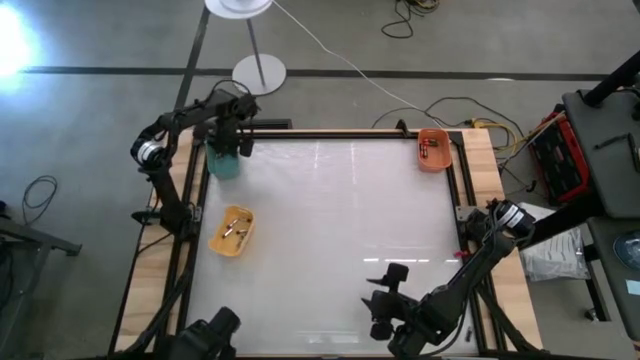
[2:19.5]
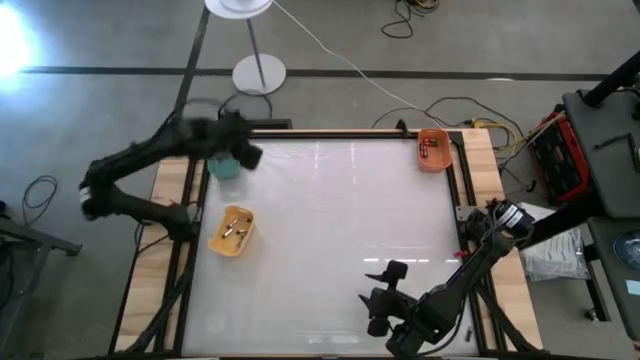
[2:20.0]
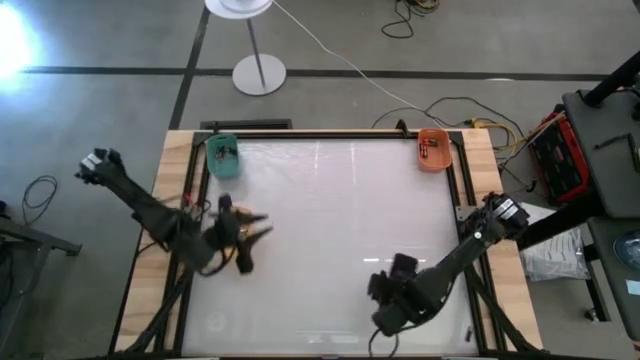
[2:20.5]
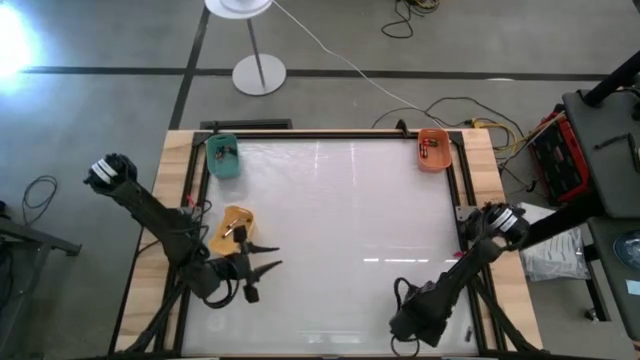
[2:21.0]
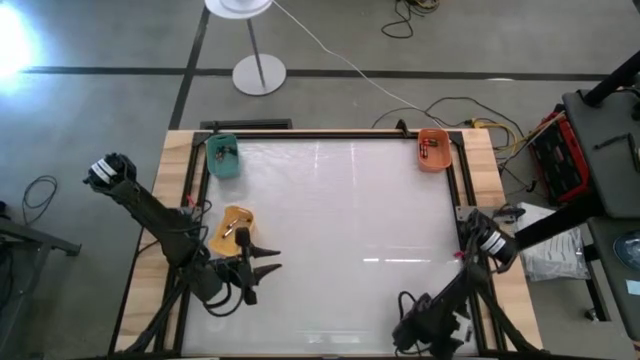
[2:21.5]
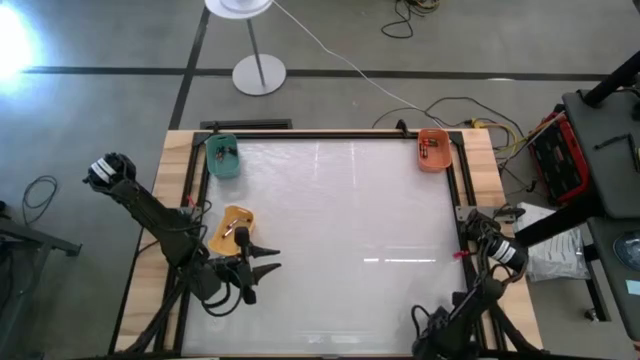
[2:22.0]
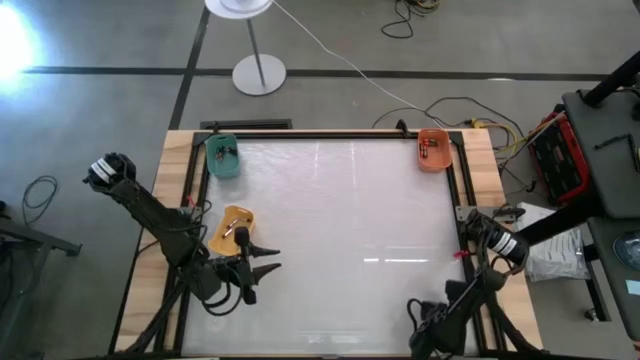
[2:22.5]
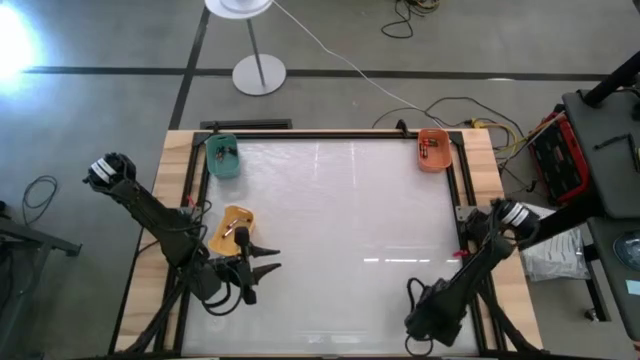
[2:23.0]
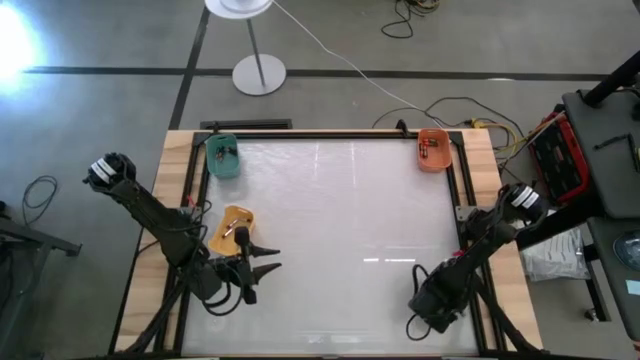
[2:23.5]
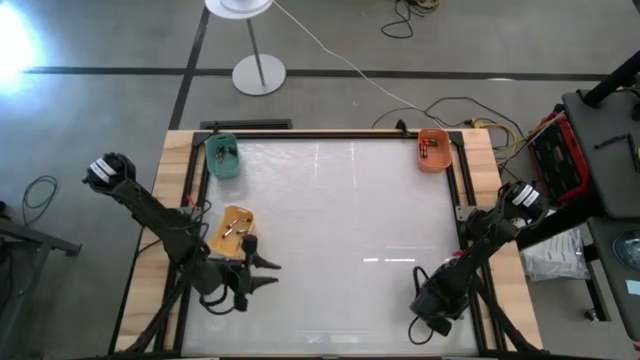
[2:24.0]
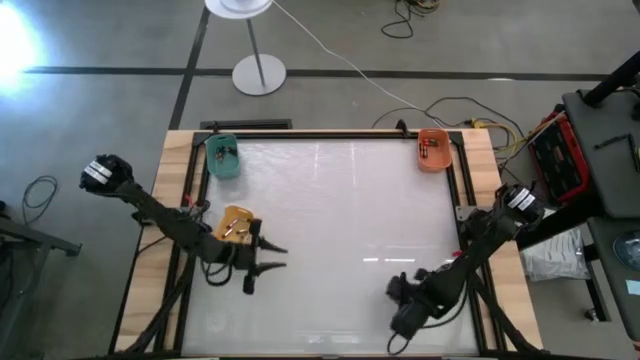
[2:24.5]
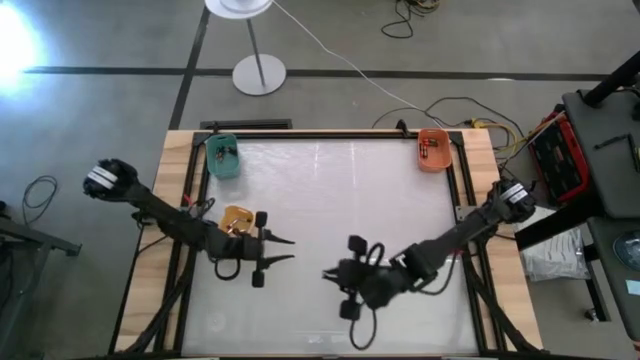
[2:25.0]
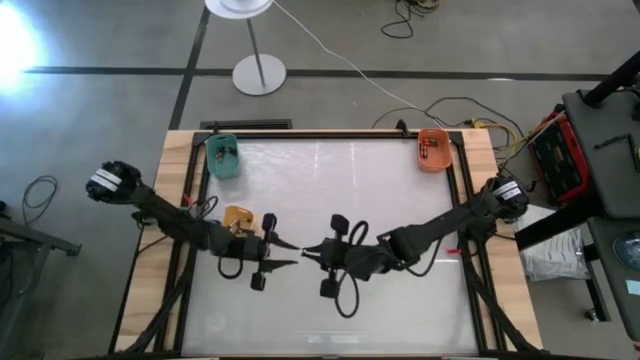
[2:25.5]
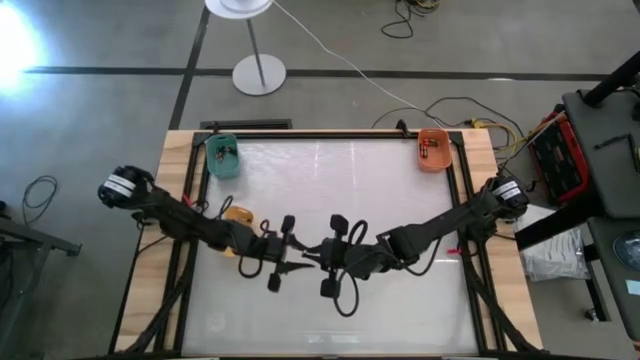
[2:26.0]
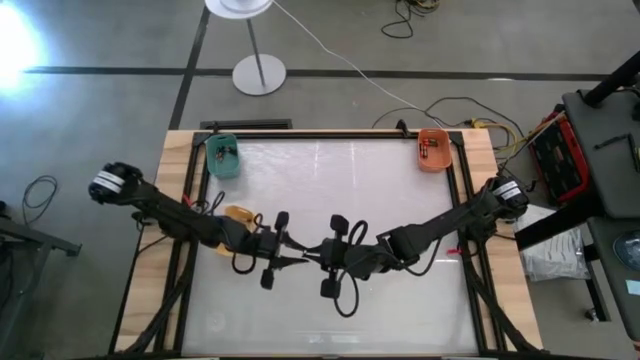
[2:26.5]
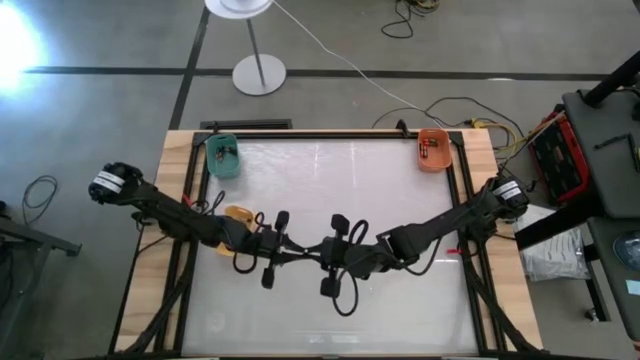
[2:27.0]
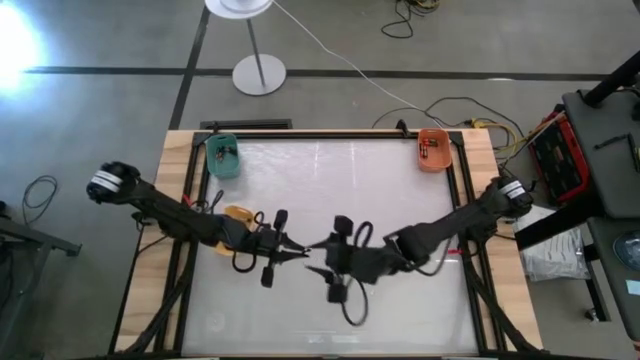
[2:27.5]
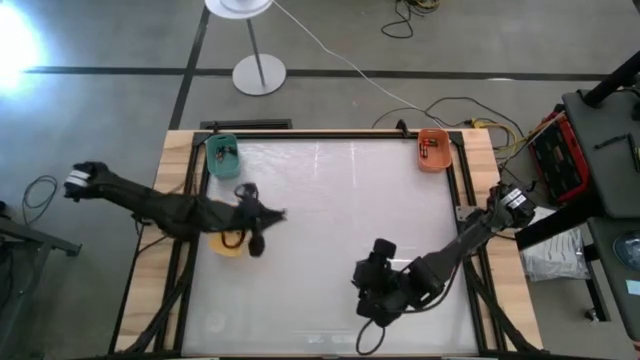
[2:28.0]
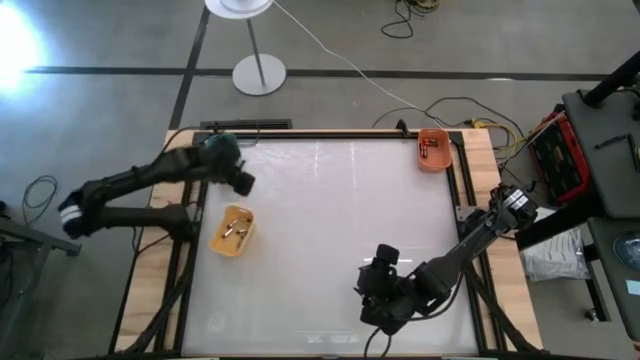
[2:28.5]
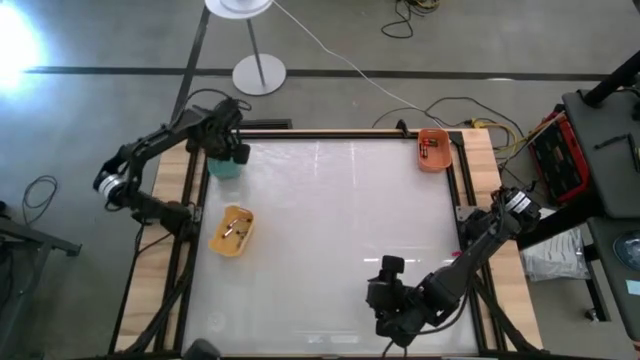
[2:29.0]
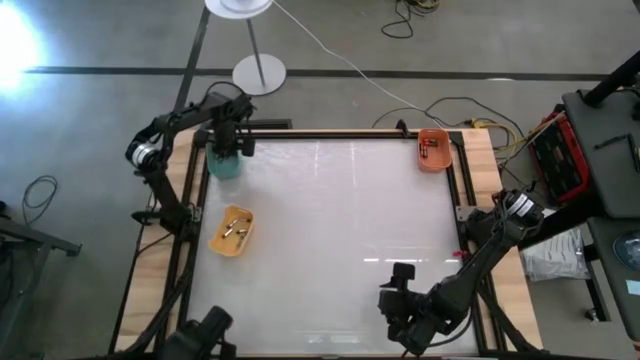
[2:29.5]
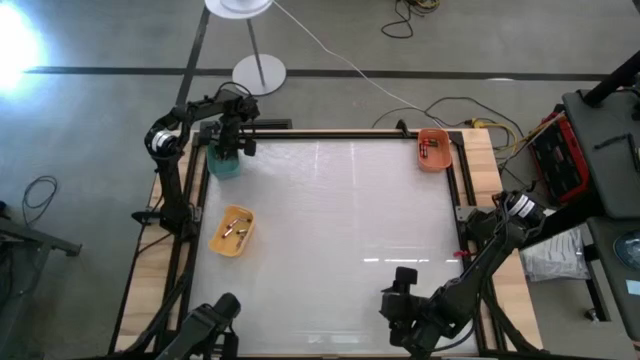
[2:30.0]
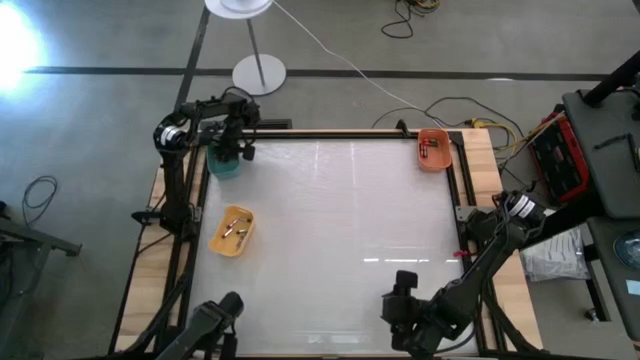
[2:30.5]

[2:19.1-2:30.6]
Task: Sort batteries
Put the black battery into the green bin

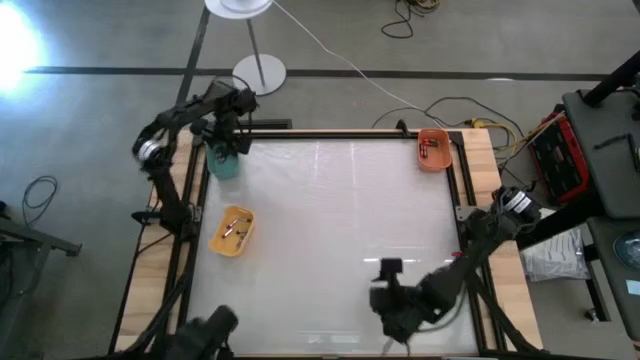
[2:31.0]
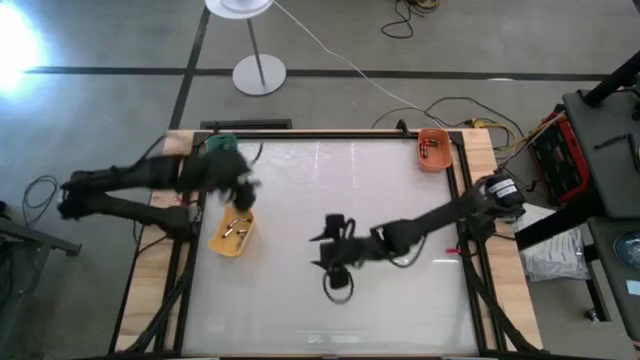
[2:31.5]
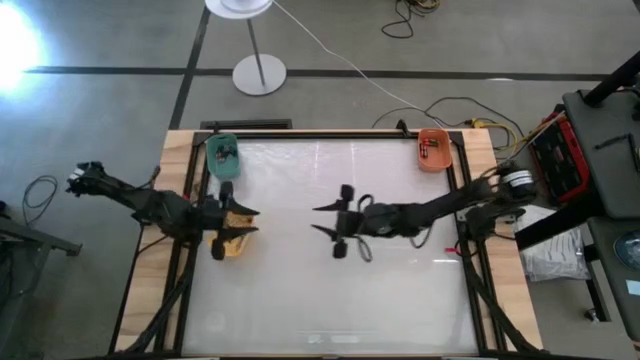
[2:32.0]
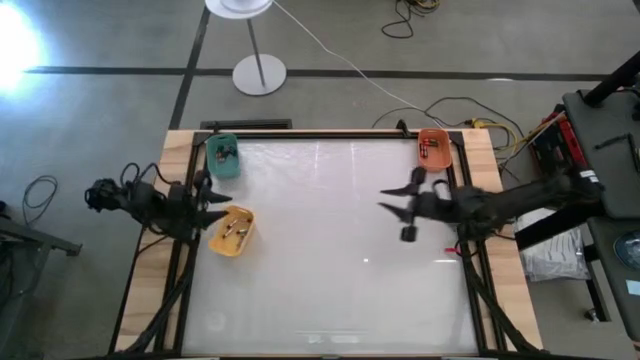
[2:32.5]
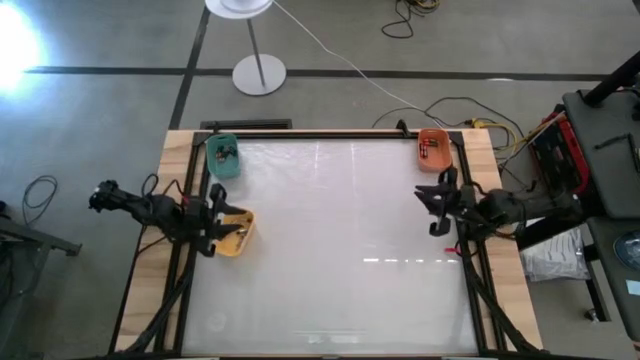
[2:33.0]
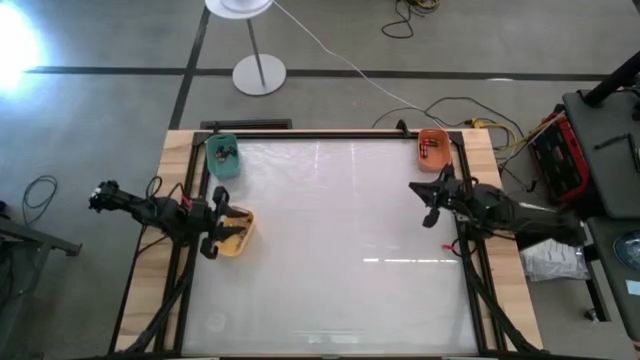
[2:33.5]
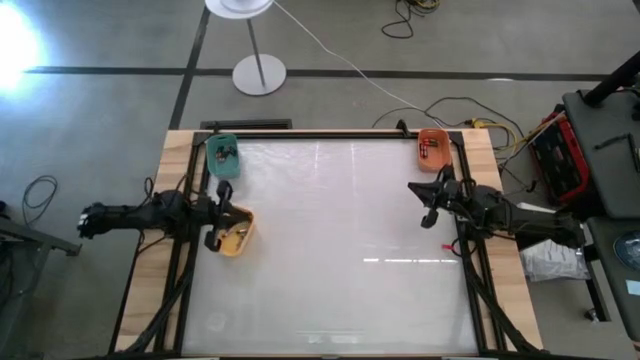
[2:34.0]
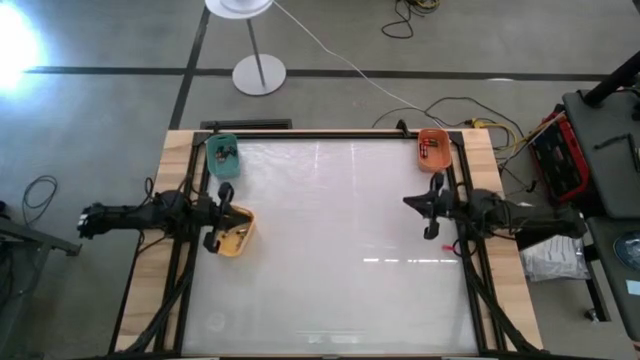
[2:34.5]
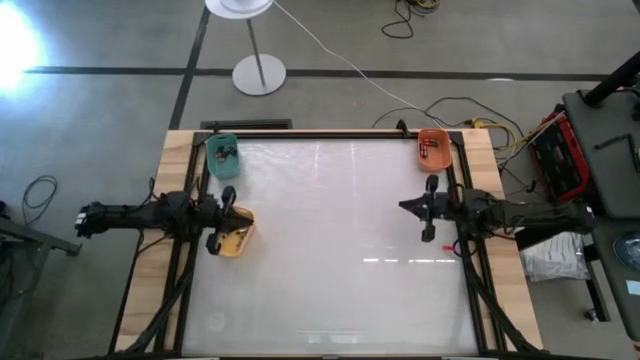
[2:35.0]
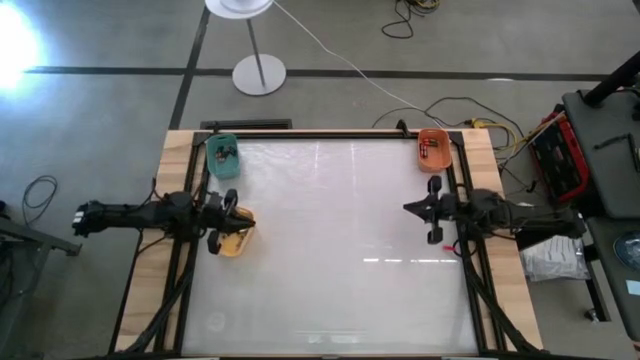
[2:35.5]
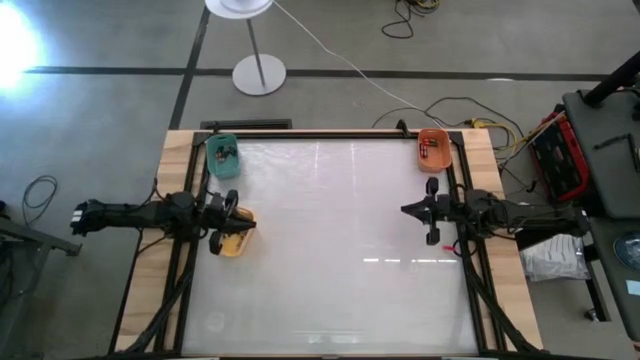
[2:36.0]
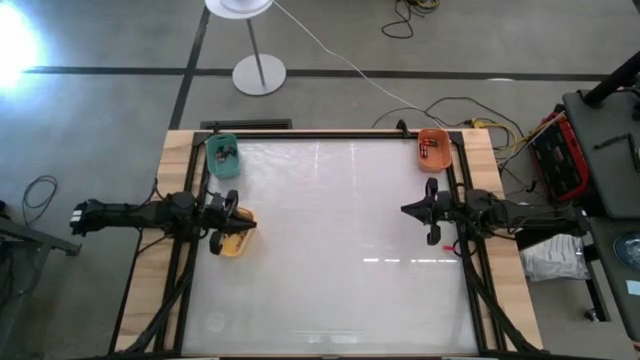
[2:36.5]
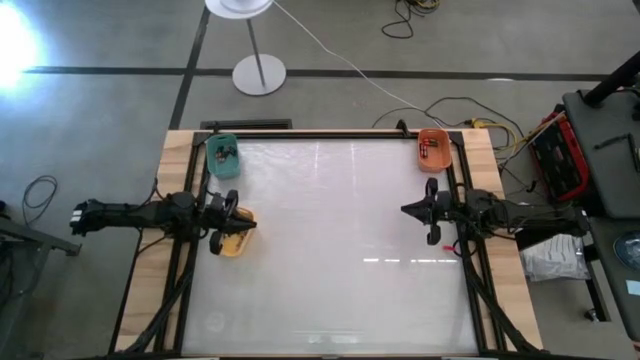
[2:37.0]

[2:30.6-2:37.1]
Return to Home Position

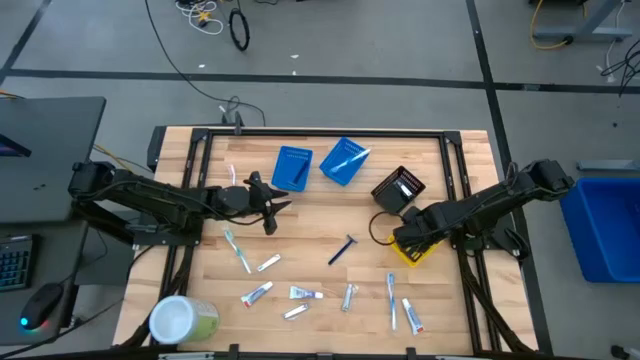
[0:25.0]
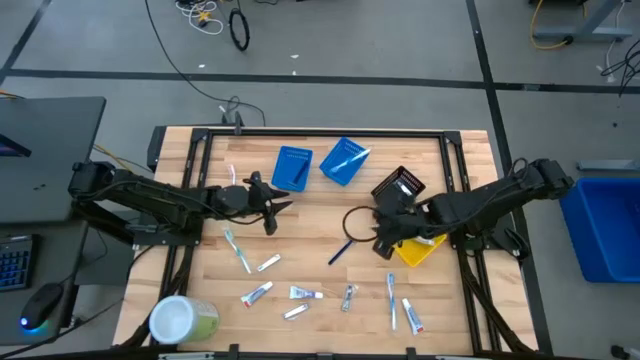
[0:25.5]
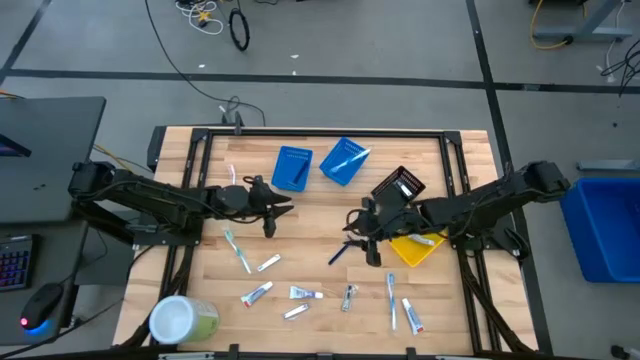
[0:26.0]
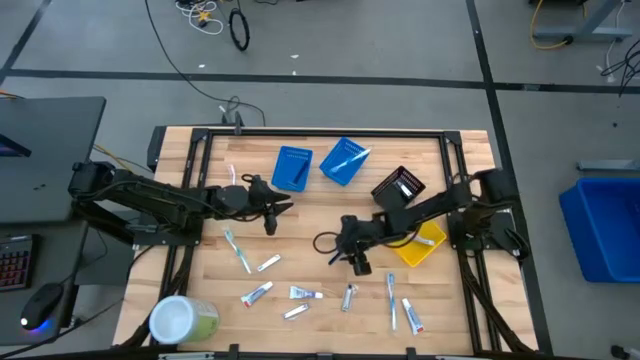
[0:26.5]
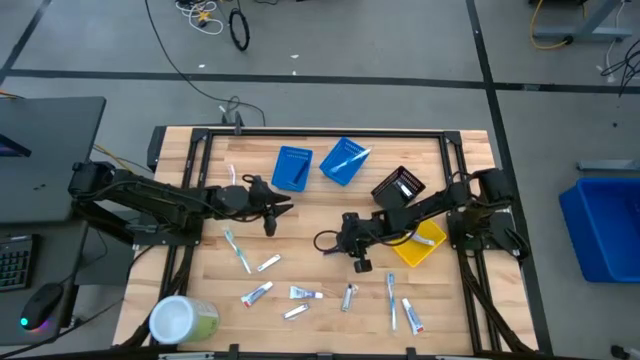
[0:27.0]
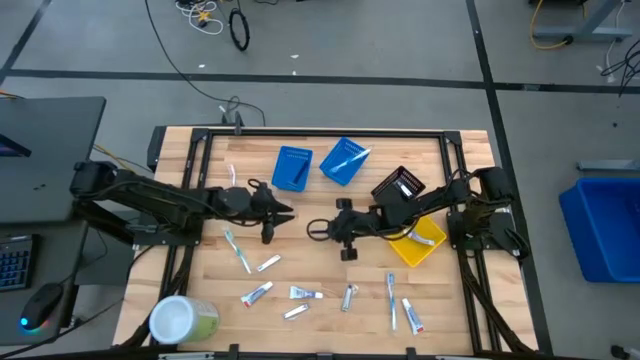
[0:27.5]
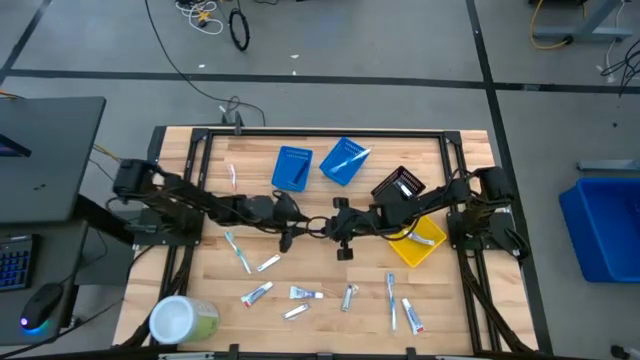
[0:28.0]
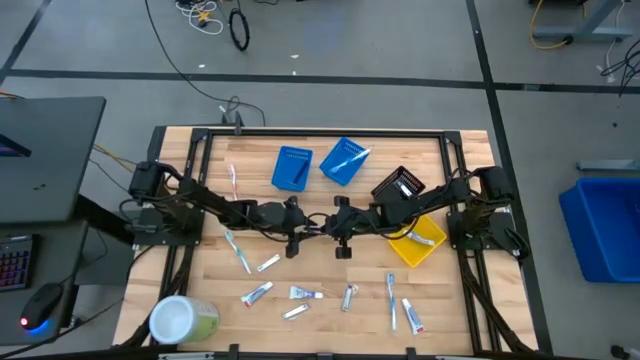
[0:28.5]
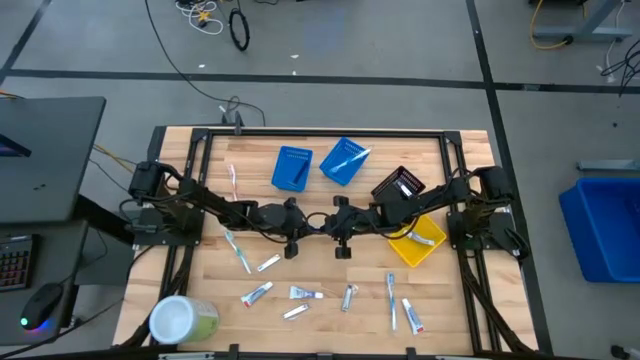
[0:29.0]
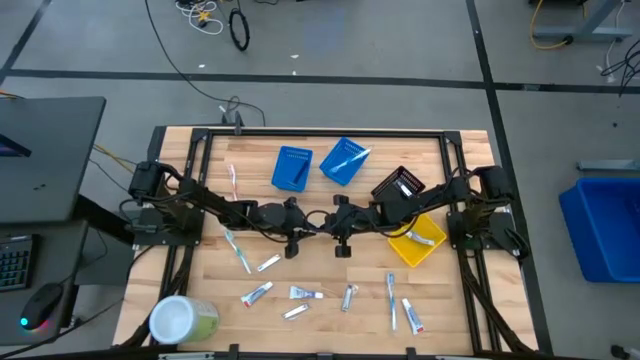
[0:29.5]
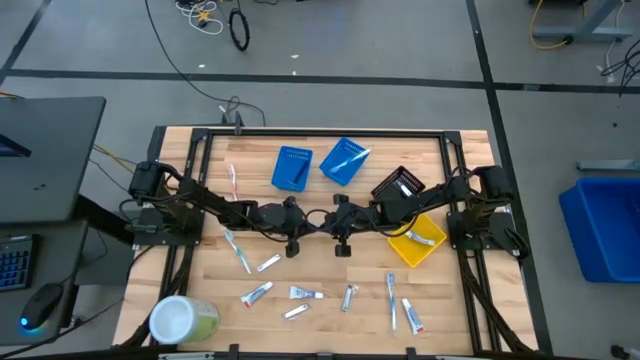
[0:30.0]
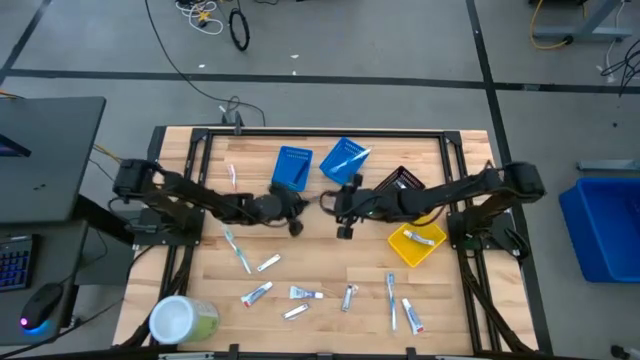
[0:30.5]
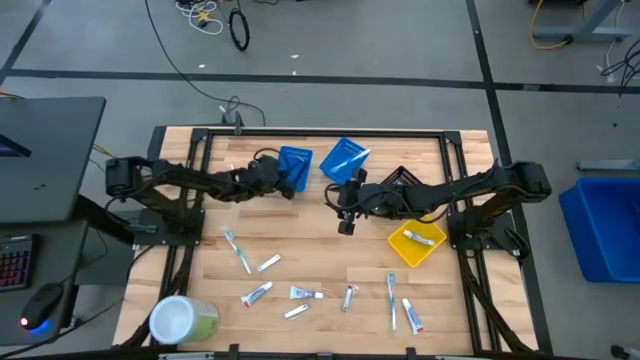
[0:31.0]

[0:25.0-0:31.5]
Task: Pick & Place Travel size toiletries
Put the blue razor into the left blue basket
